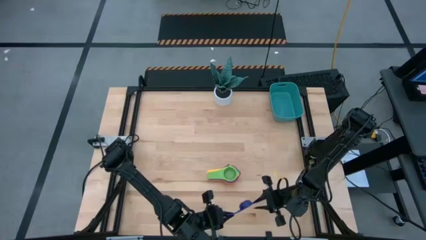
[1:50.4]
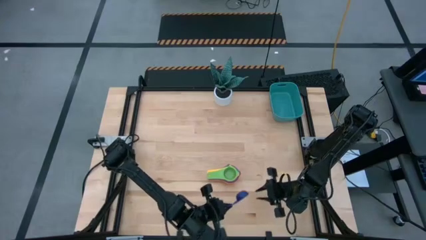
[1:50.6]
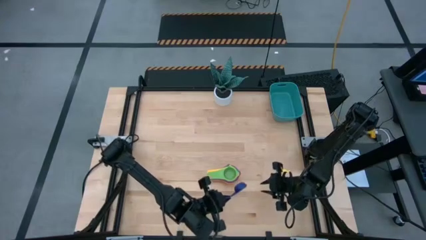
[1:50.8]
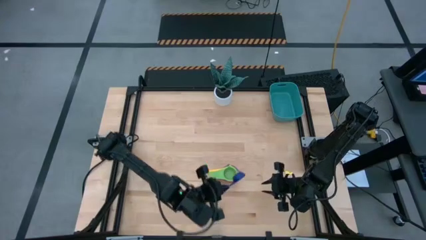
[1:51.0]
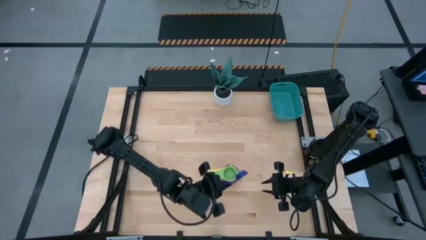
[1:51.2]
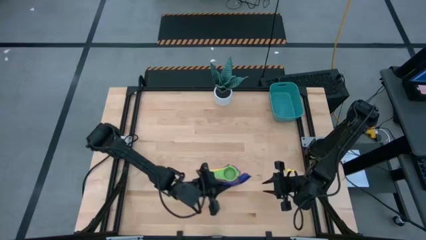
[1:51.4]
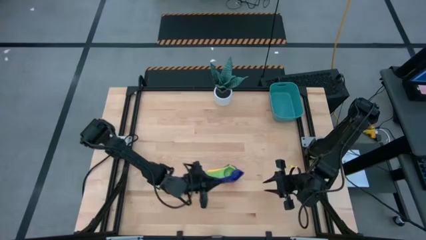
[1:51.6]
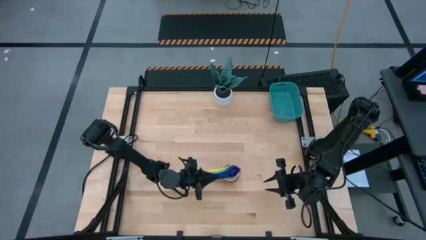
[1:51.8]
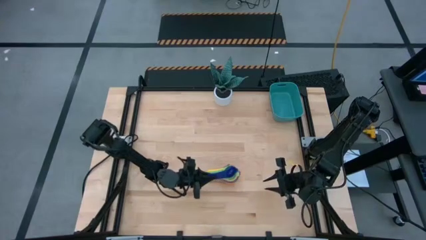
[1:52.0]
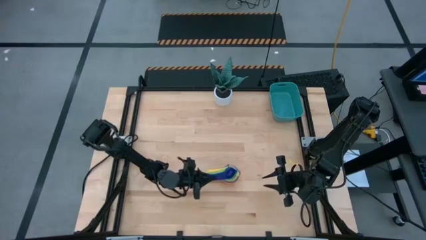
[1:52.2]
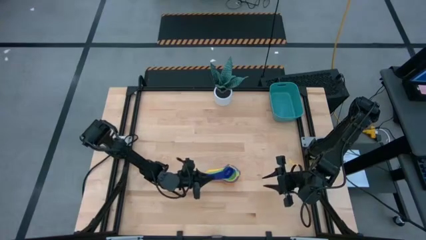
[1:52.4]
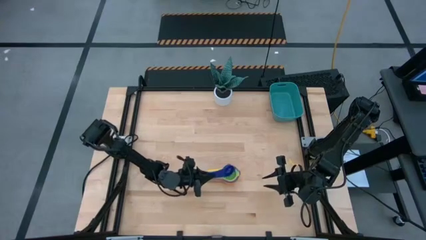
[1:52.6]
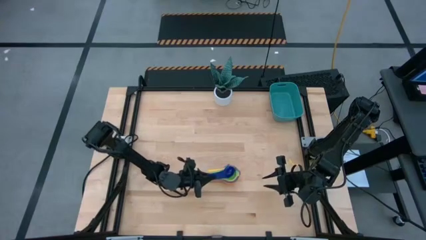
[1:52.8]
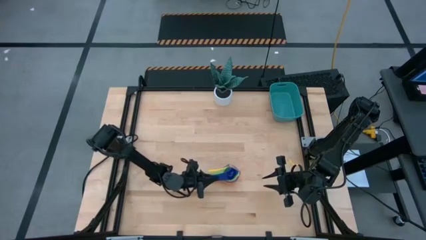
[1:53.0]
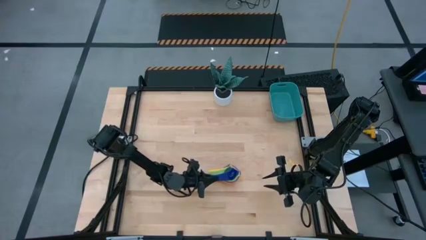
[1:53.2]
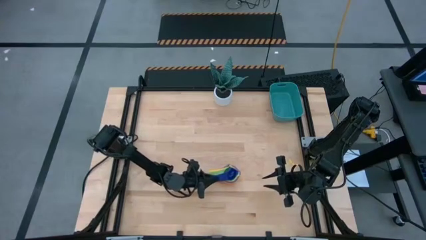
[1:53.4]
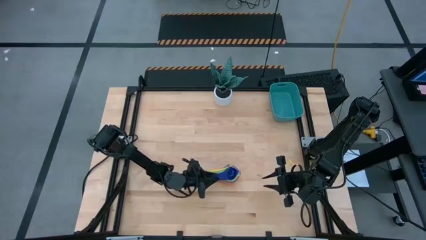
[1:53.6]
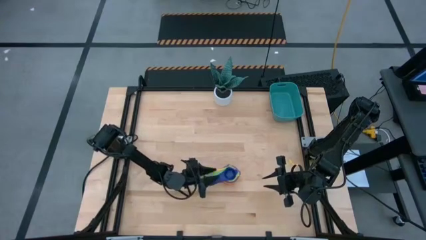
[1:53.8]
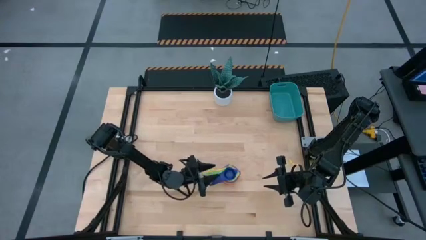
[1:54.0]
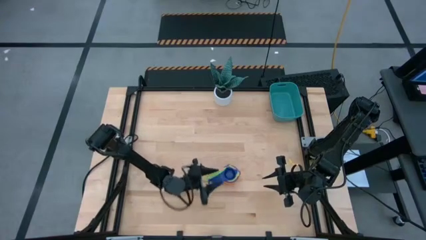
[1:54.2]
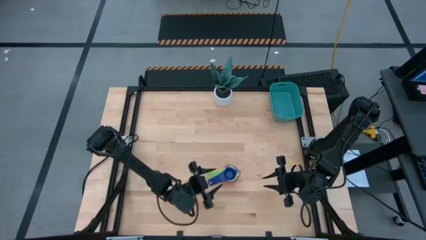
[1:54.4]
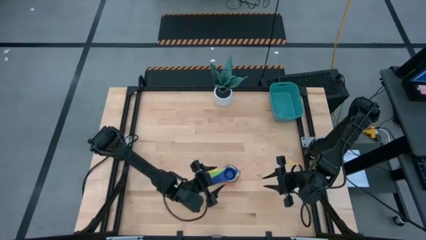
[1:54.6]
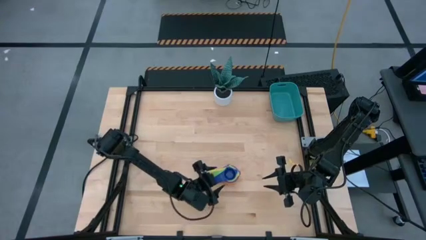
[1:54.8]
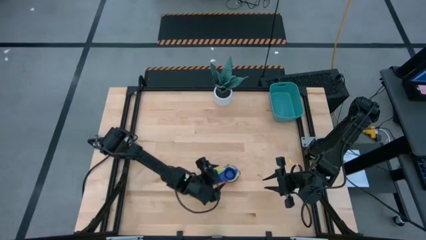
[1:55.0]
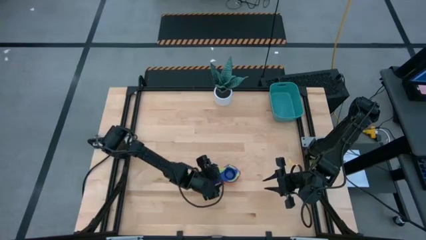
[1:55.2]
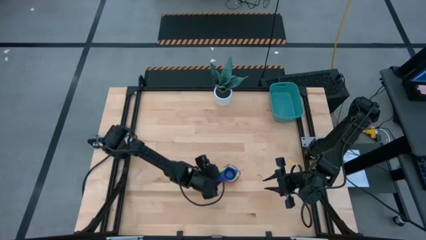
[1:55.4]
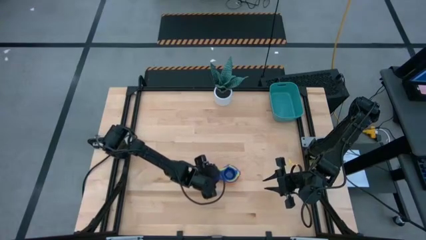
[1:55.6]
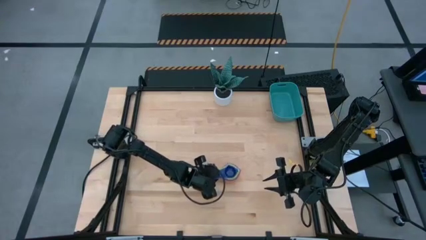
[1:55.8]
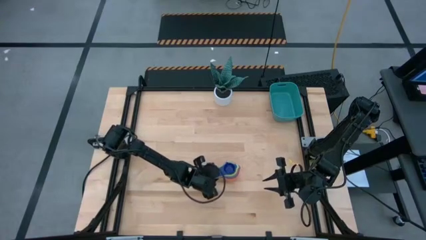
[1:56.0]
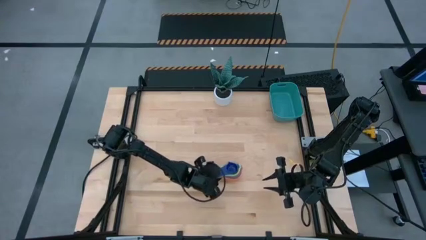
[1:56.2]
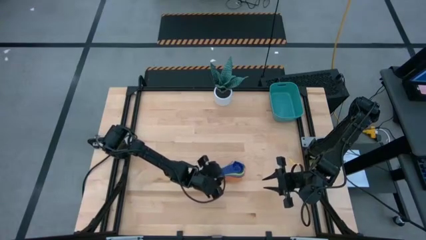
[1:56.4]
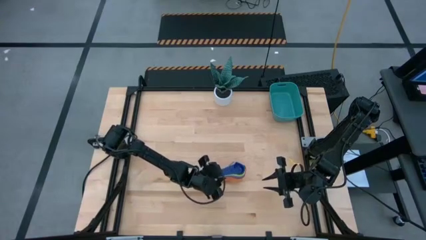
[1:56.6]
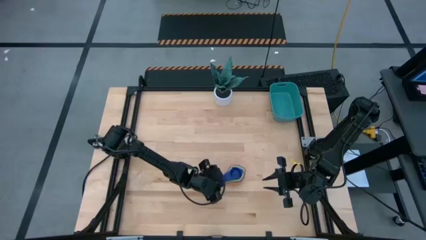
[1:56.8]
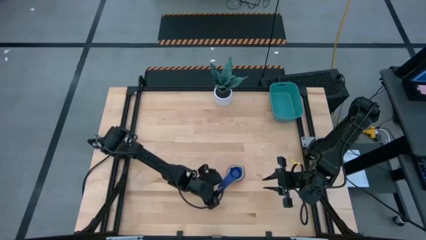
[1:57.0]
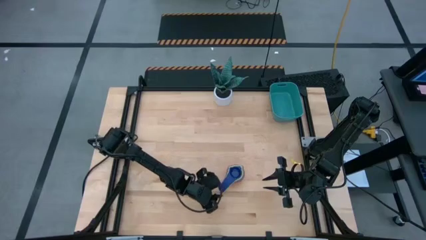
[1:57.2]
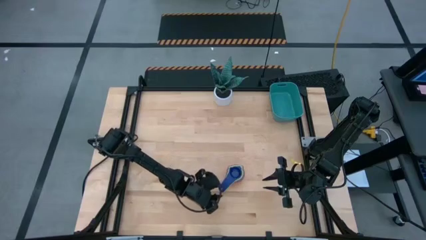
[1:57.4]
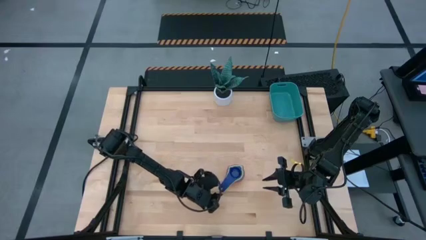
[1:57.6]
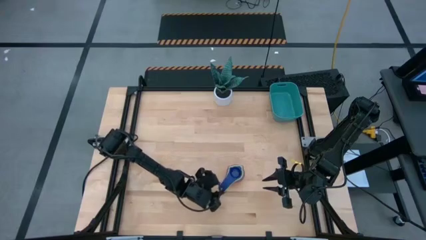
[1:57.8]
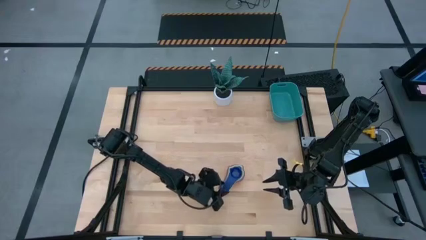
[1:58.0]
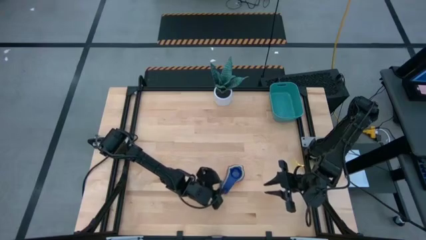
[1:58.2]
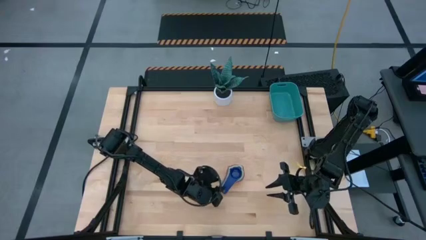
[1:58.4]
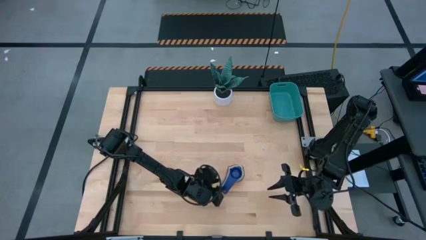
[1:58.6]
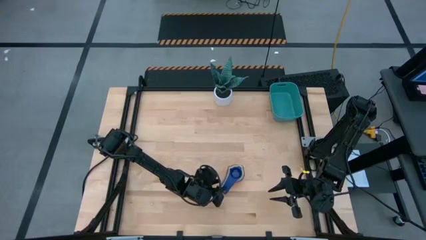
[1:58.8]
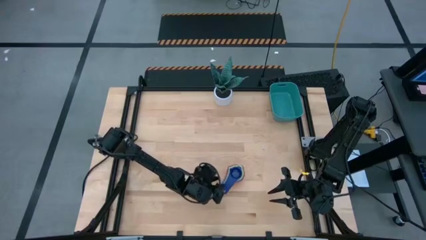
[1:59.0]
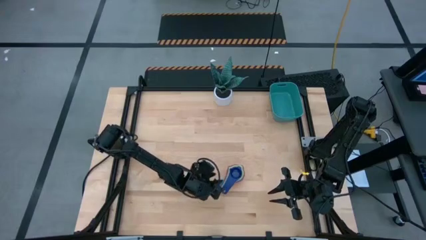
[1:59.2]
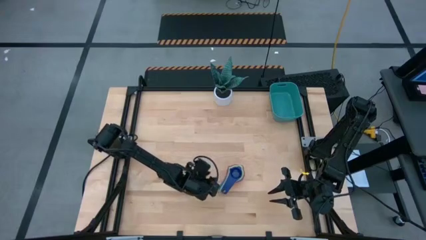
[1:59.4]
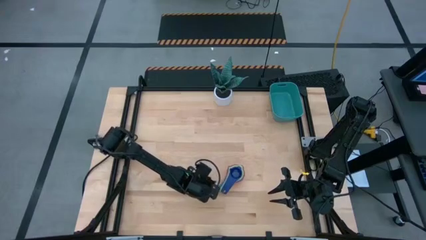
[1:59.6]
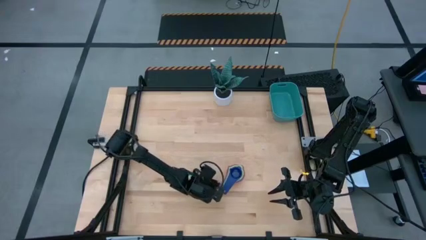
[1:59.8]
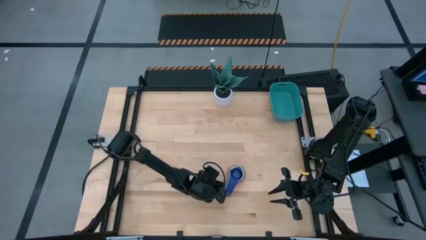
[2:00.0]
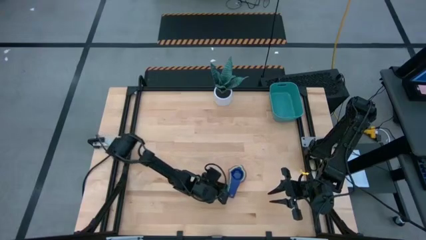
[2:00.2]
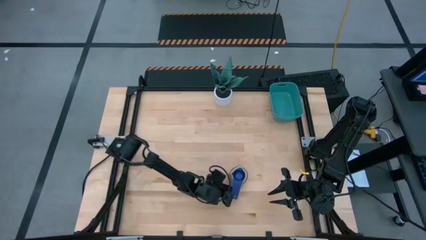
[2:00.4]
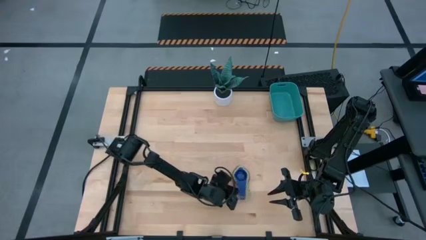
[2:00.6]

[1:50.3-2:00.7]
Task: Nest measuring cups in basket
Stack the dark blue measuring cup on top of the green measuring cup

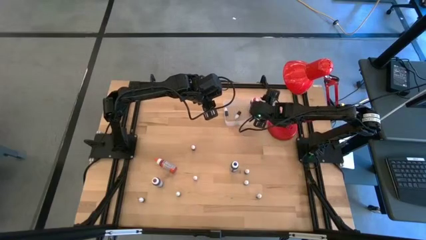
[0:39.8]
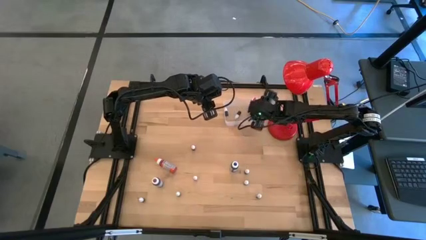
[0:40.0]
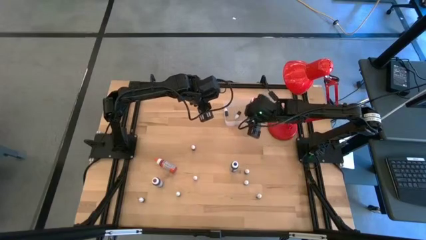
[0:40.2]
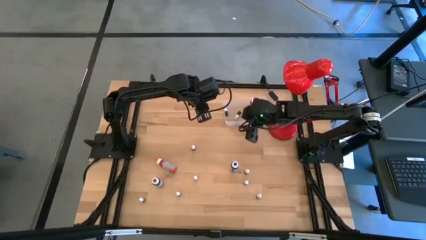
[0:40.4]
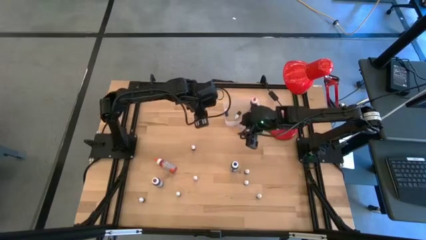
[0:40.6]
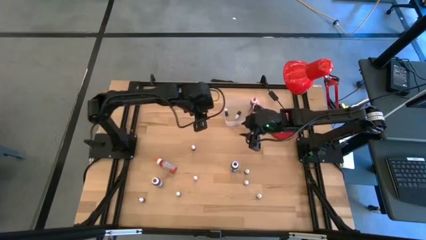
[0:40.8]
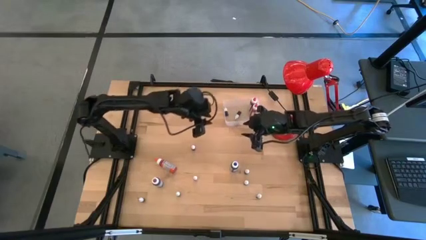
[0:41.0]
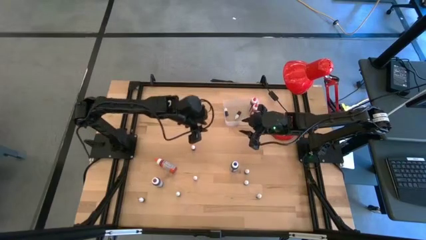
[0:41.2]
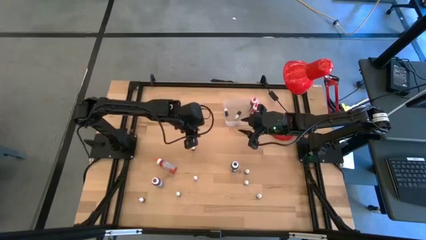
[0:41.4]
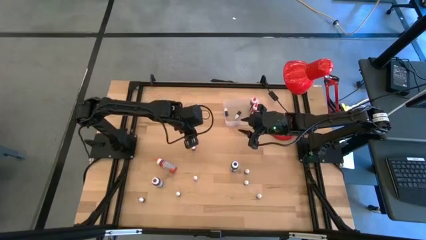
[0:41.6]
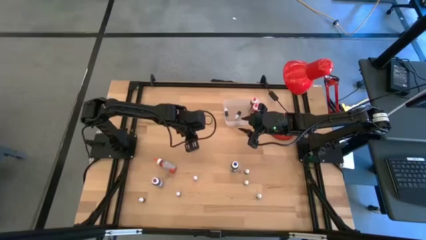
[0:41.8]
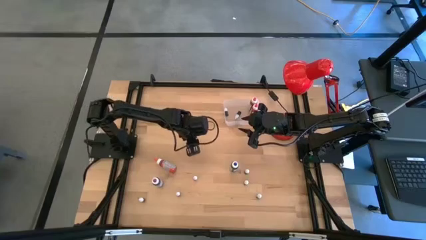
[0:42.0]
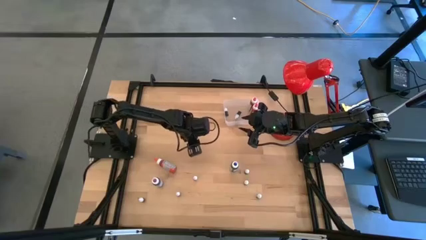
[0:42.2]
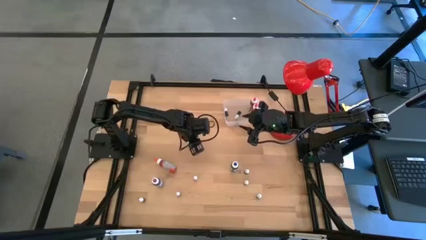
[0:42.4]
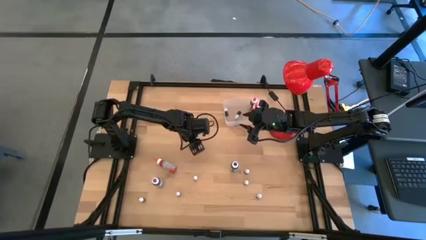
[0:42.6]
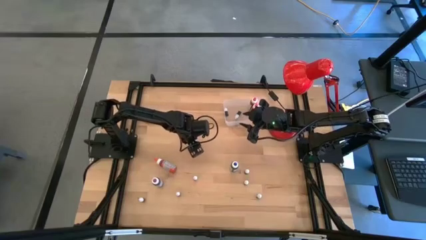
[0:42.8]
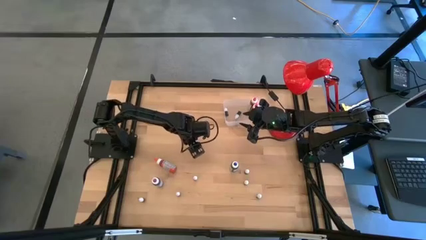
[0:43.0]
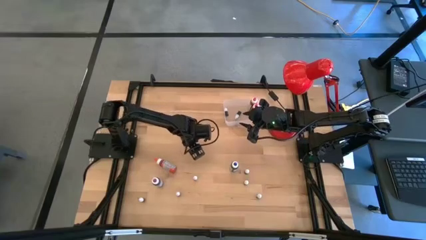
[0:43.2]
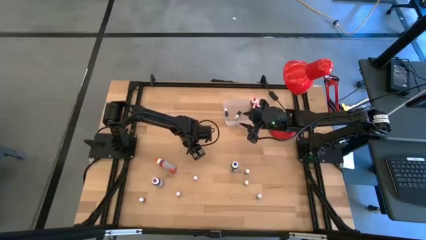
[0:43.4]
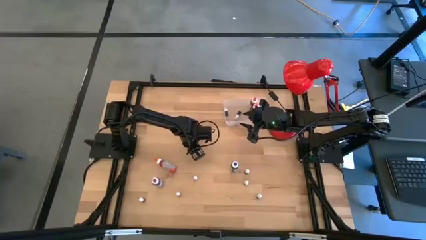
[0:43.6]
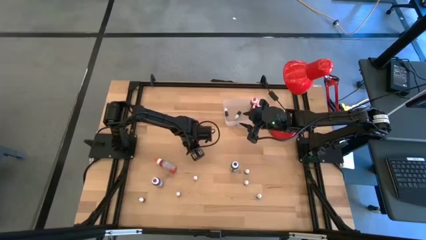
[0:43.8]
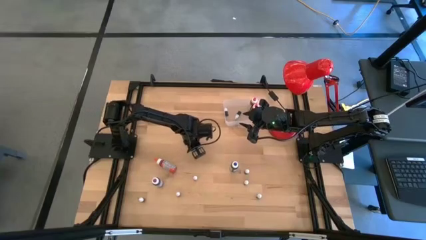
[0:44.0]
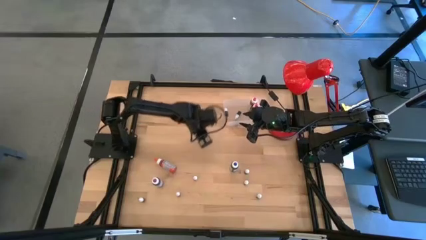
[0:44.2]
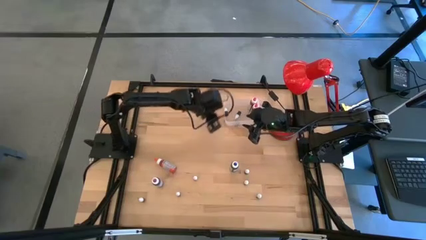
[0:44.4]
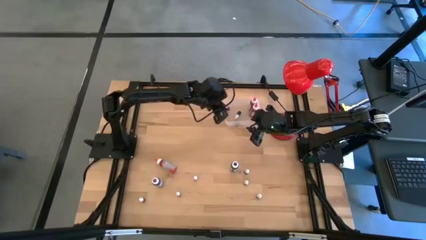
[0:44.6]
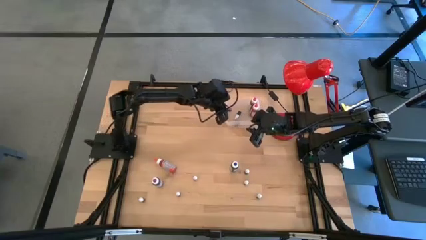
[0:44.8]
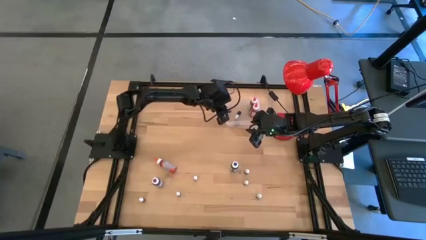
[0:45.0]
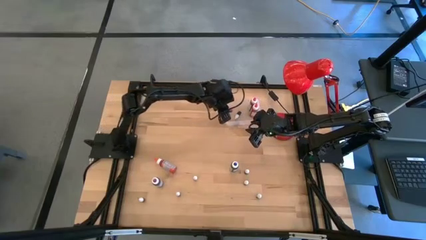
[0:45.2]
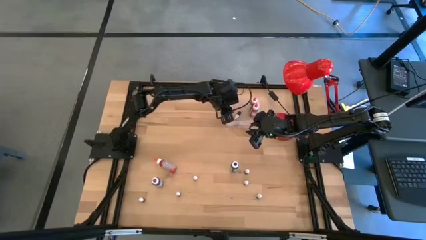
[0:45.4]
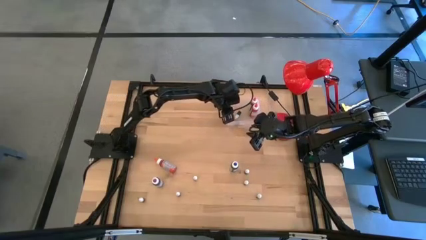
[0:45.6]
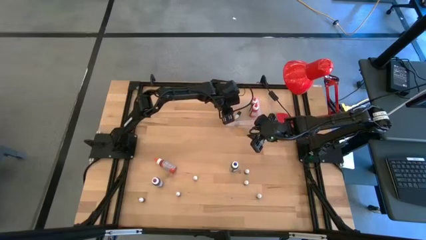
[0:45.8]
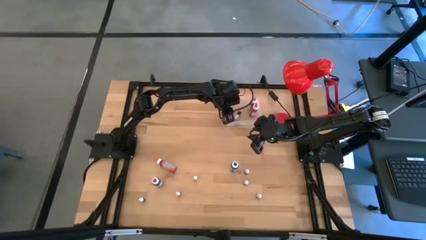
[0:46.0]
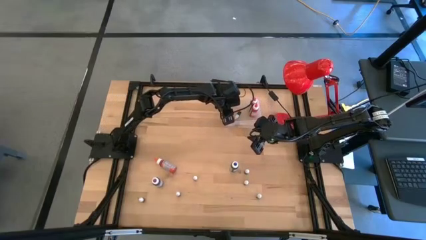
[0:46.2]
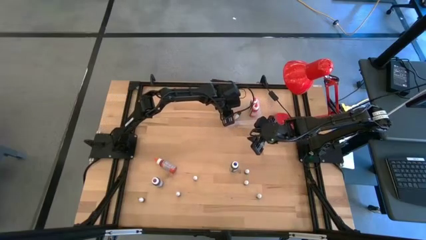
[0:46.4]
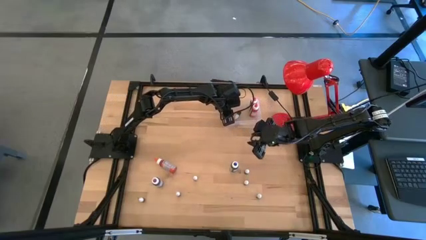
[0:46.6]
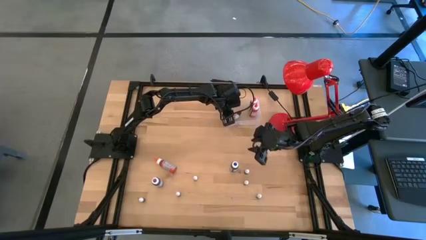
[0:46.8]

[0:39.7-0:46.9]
Task: Pick & Place food coloring
Put the small red food coloring bottle in the transparent bin
